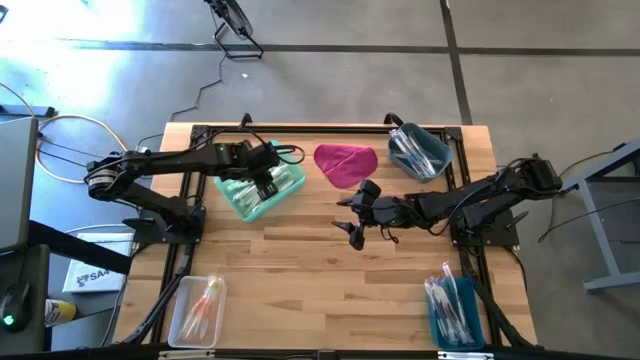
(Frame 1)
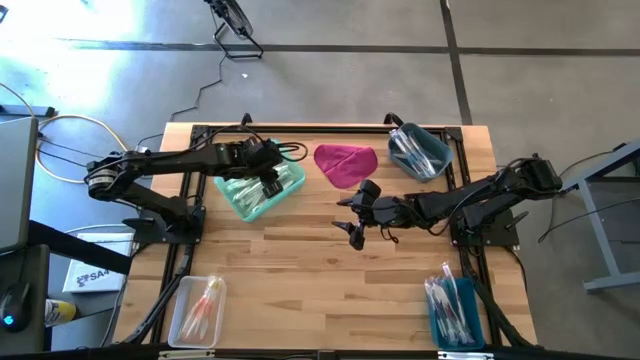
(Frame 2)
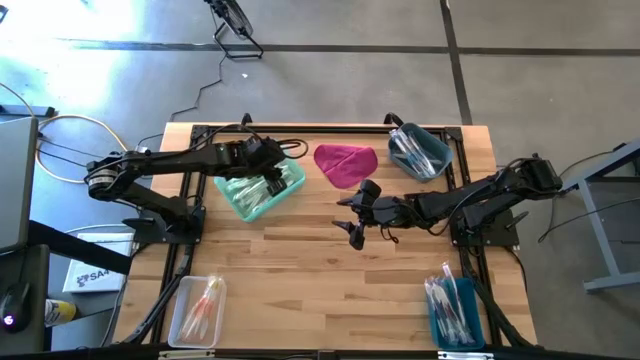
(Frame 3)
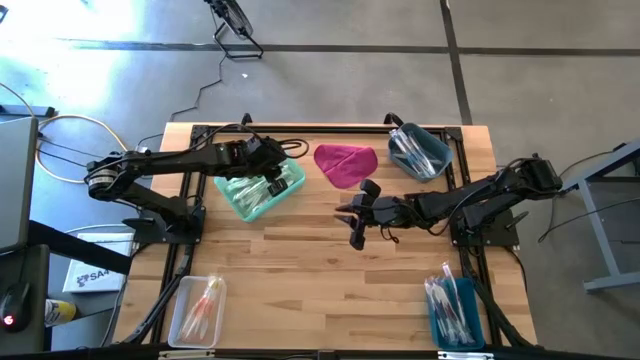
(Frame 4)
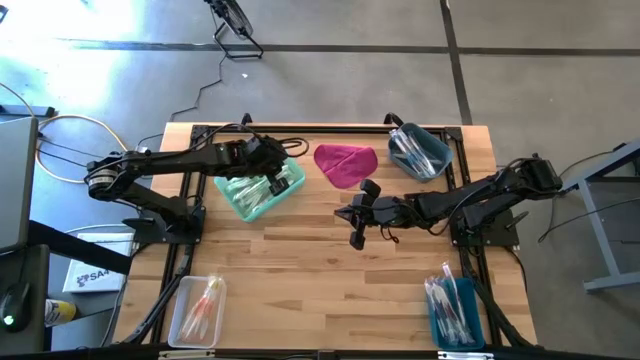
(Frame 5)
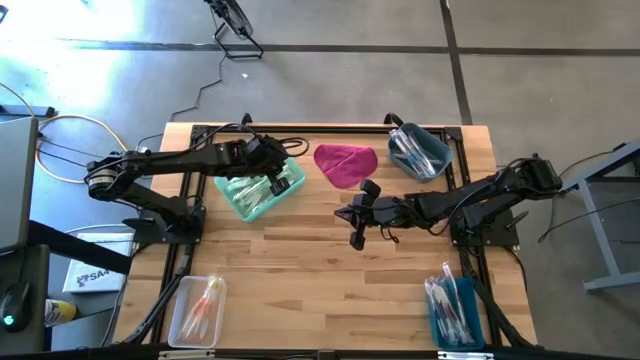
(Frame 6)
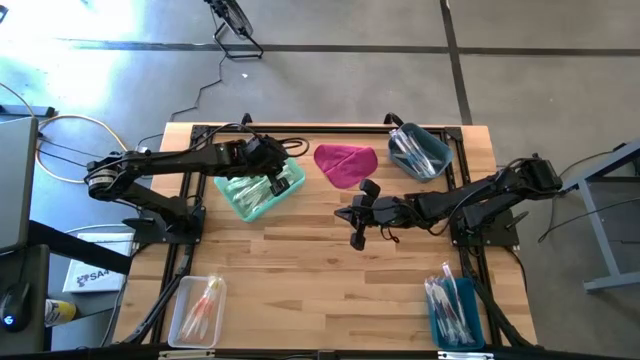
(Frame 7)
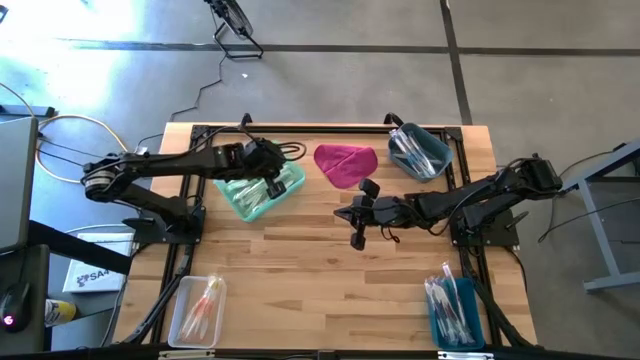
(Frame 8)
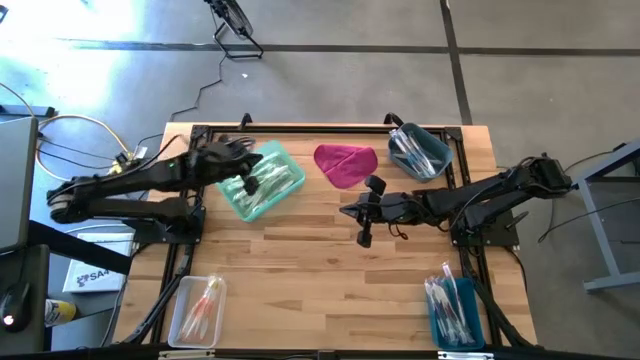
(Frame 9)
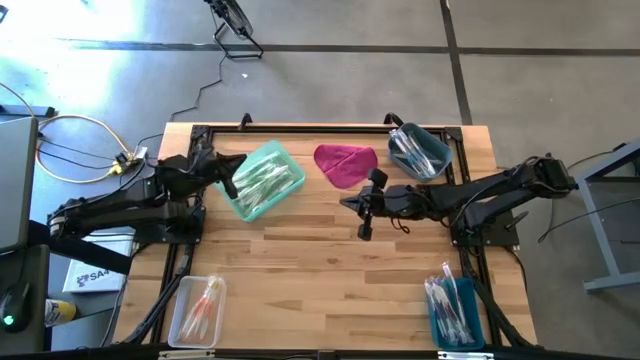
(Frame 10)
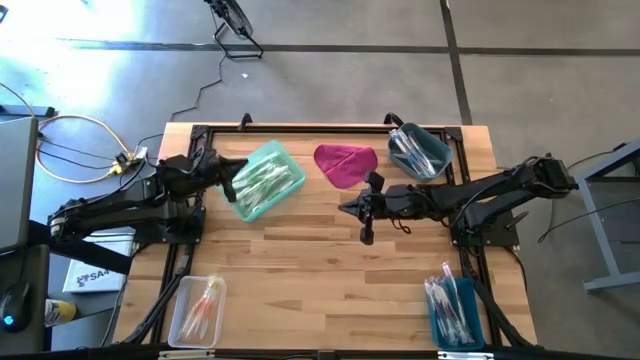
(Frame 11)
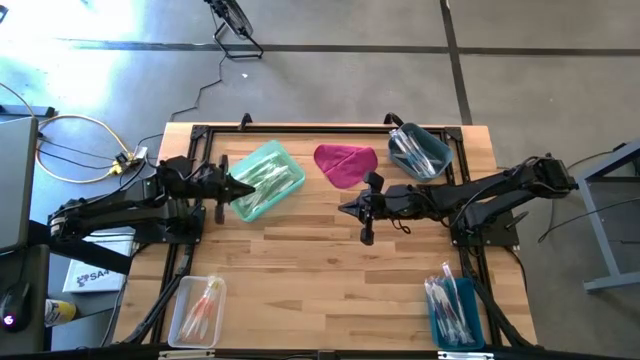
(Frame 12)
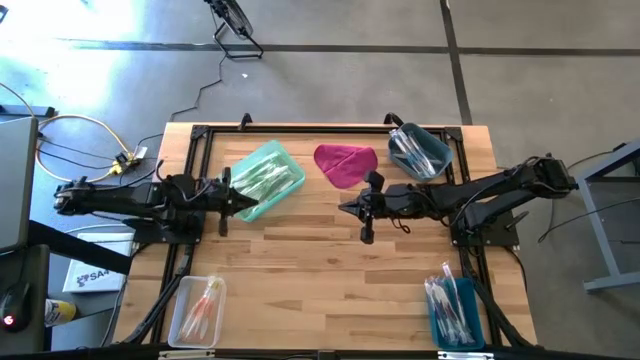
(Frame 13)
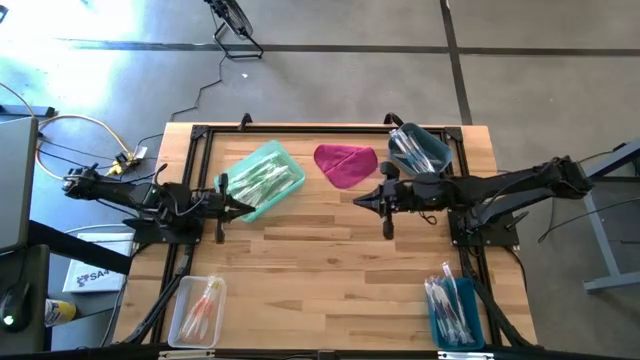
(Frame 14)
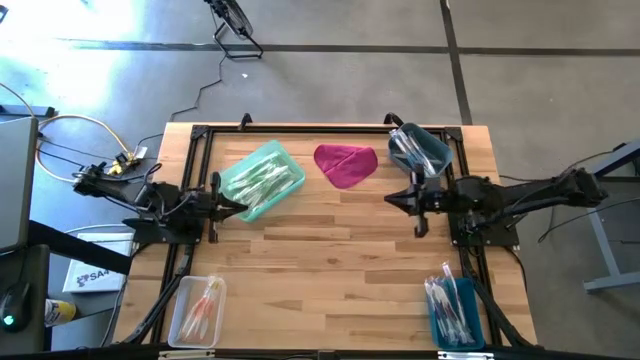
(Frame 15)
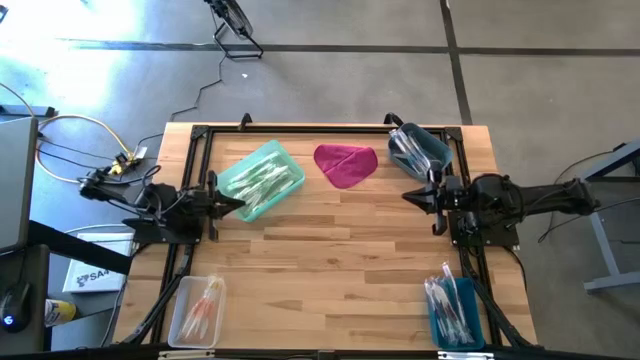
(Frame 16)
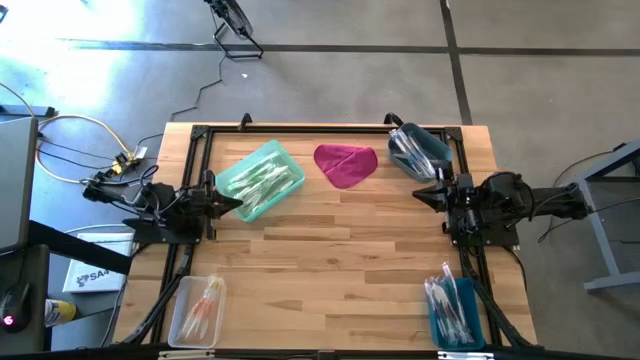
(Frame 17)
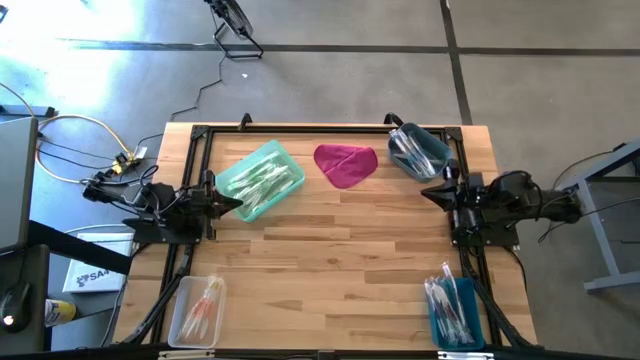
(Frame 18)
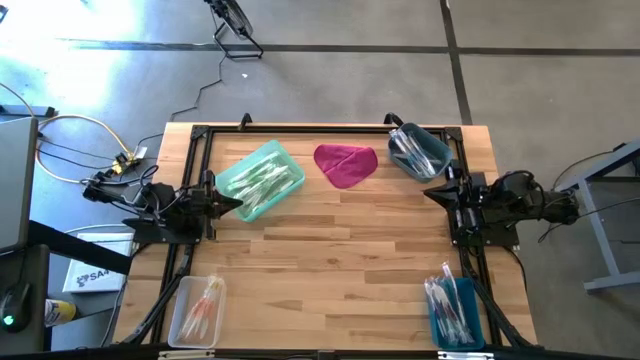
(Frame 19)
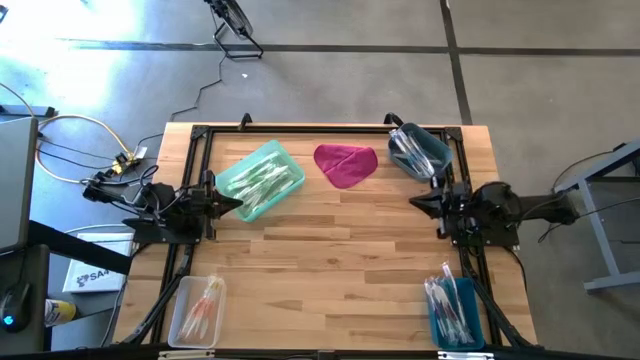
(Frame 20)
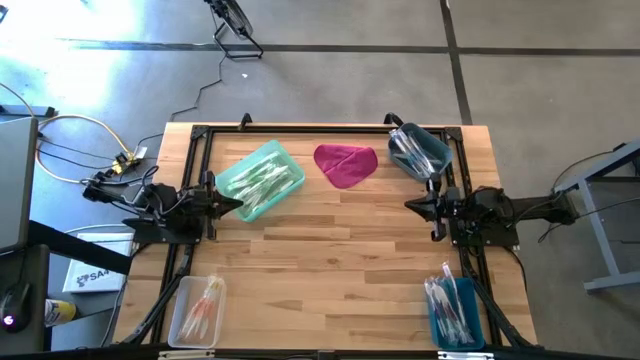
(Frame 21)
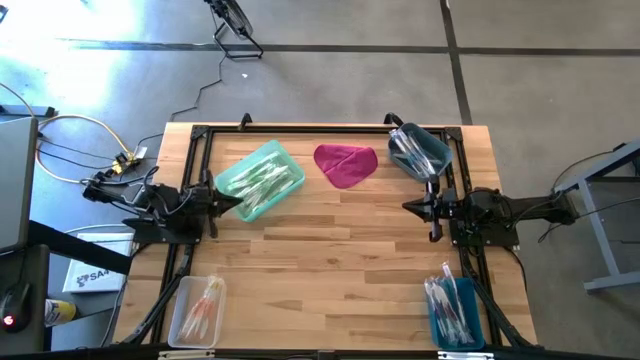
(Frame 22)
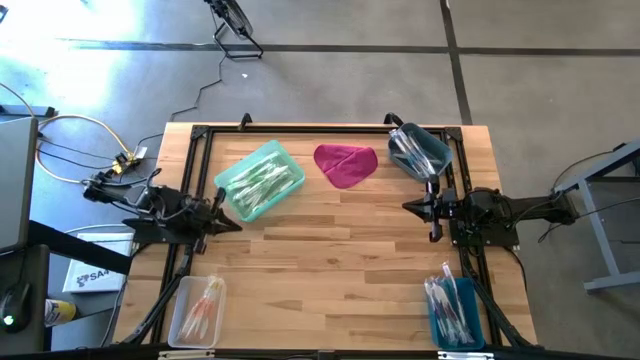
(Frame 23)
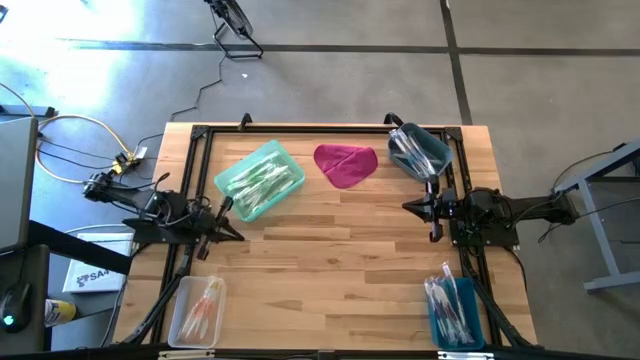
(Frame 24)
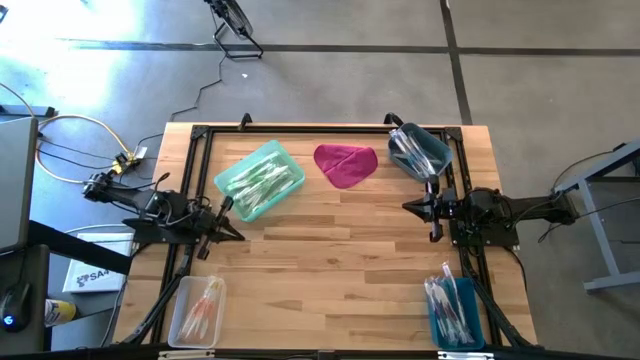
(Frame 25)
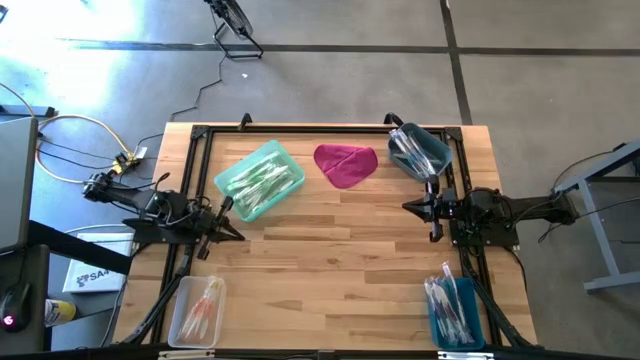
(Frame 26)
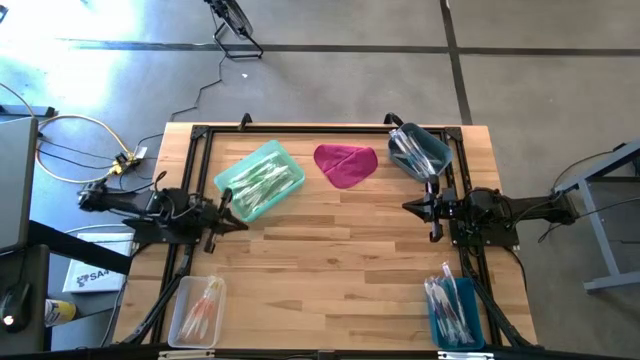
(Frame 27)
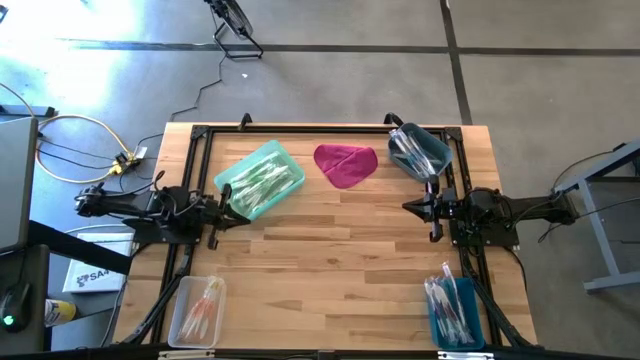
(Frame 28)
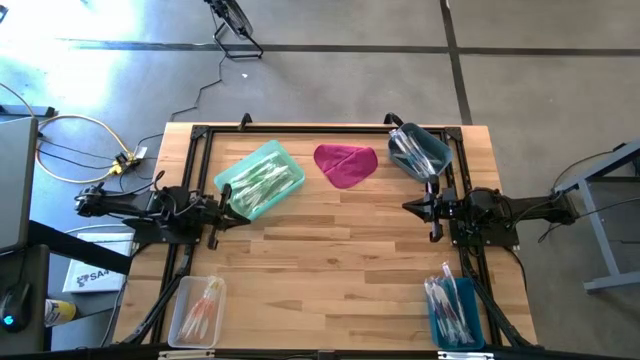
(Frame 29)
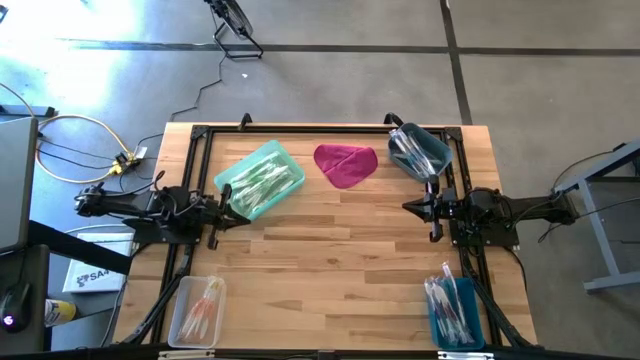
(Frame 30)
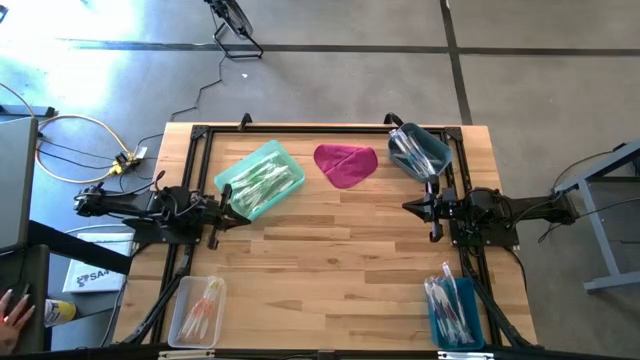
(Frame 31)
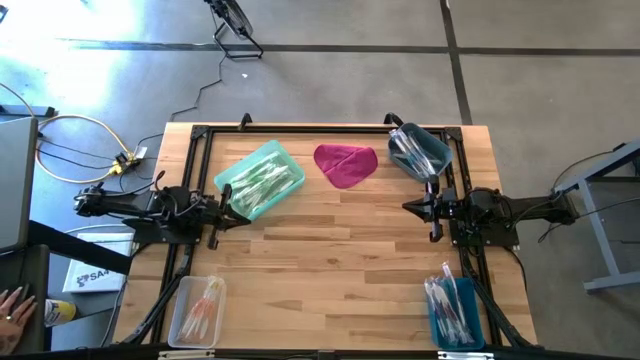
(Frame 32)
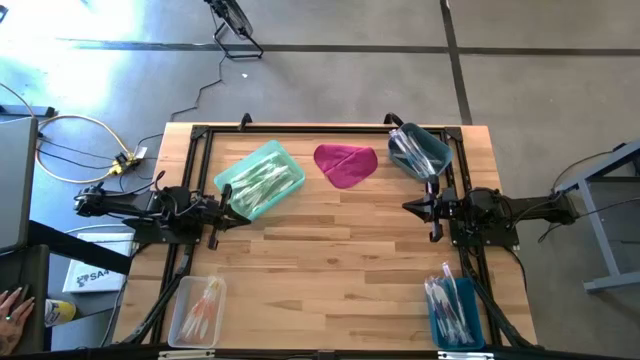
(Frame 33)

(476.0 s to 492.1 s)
Task: Pick & Place Toothbrushes
Return to Home Position

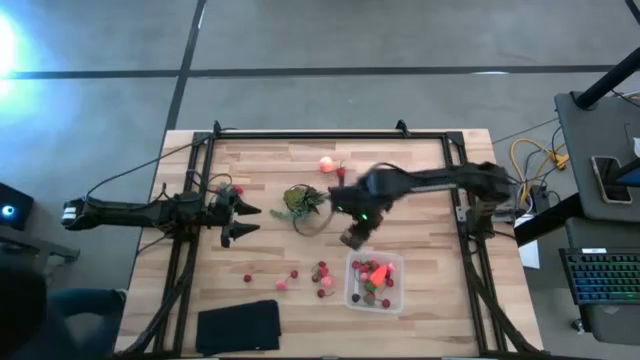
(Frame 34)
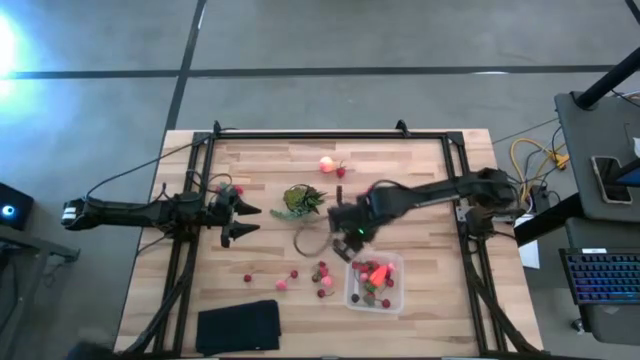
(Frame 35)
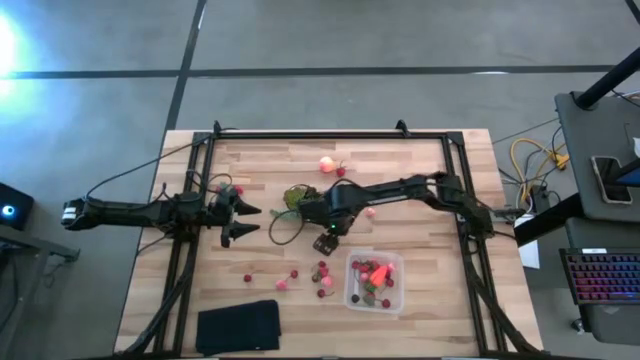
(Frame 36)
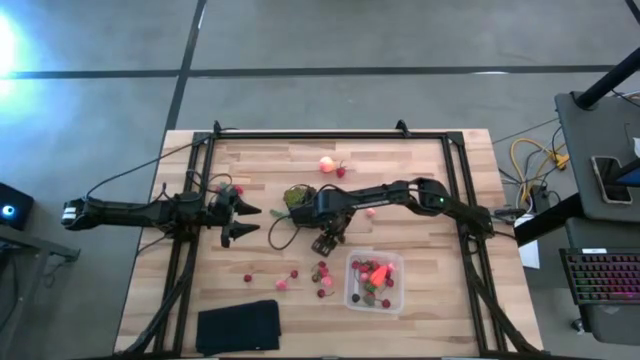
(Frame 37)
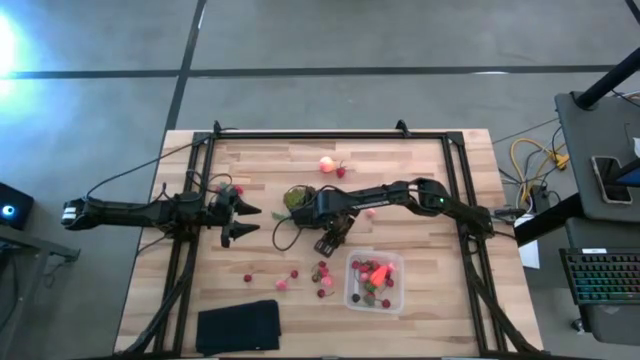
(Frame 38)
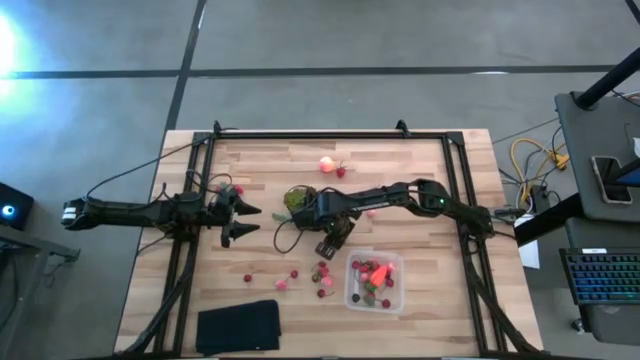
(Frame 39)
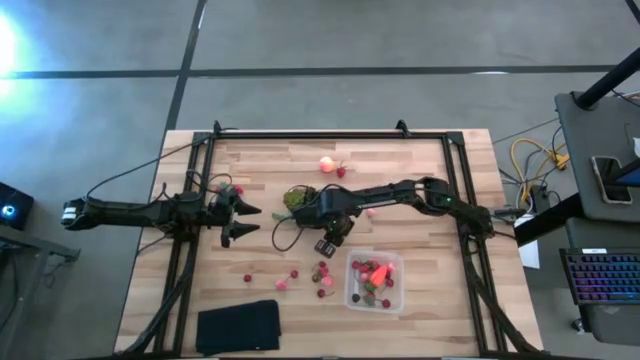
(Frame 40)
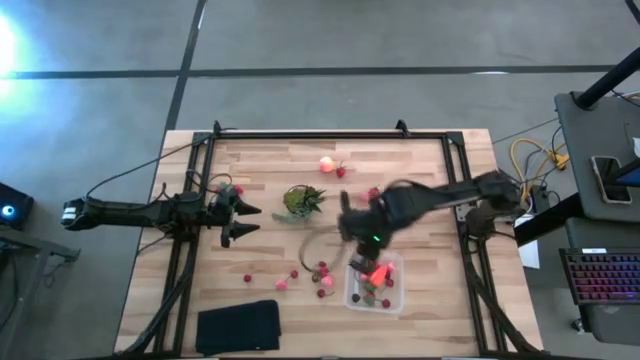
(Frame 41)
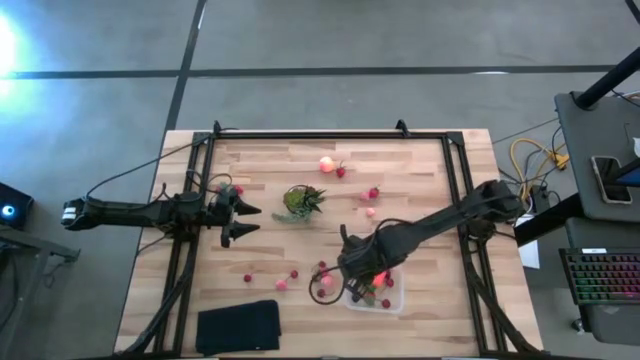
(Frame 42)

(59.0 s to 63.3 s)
Task: Pick and placing Produce into tupperware
Put the blackberry into the bin
